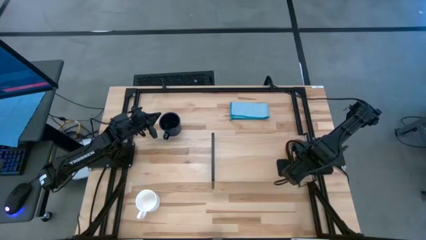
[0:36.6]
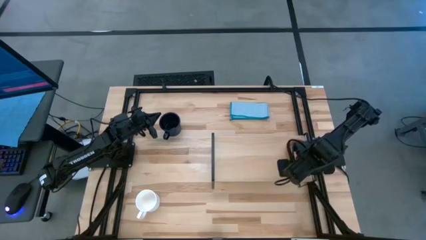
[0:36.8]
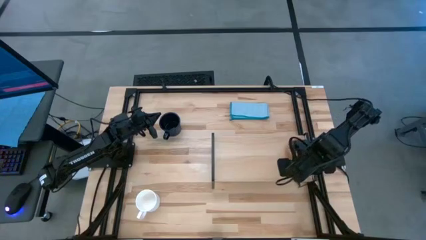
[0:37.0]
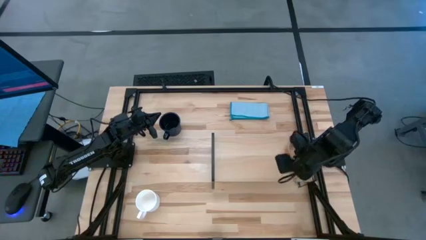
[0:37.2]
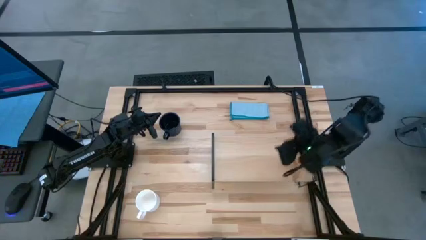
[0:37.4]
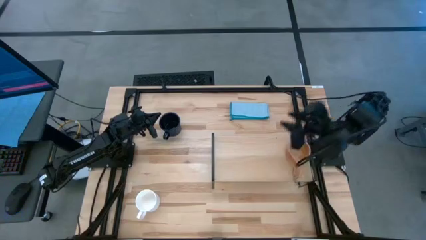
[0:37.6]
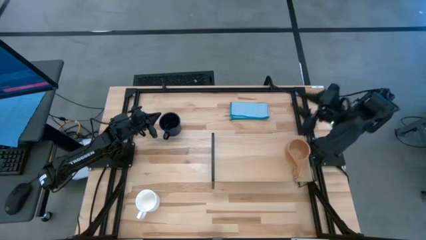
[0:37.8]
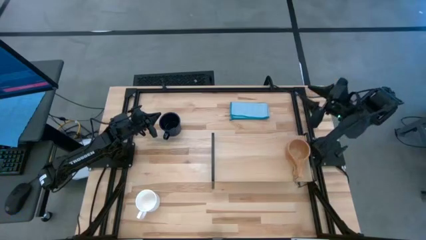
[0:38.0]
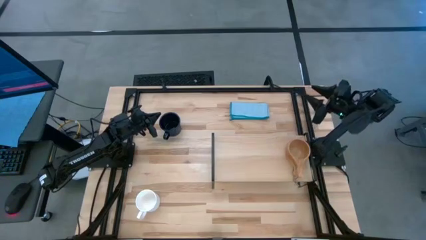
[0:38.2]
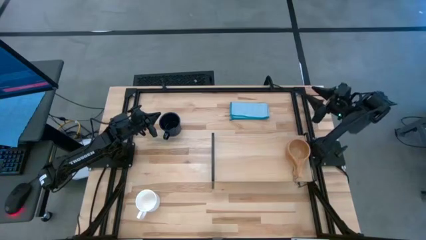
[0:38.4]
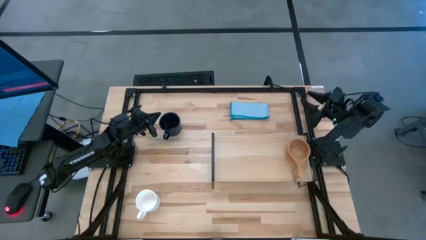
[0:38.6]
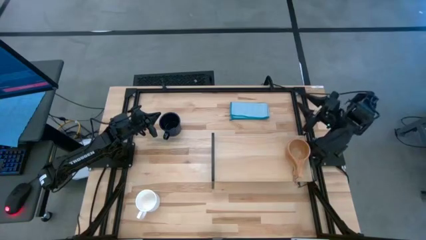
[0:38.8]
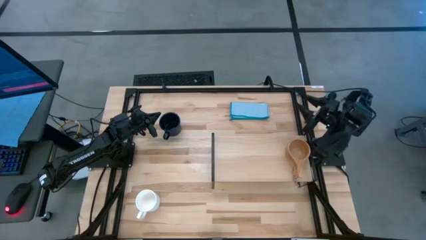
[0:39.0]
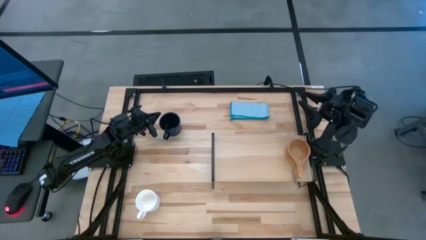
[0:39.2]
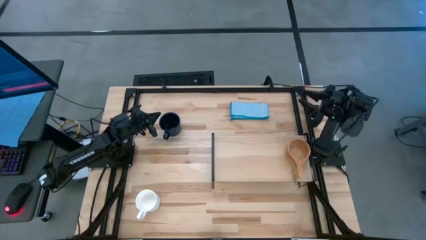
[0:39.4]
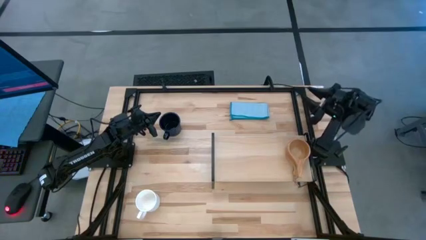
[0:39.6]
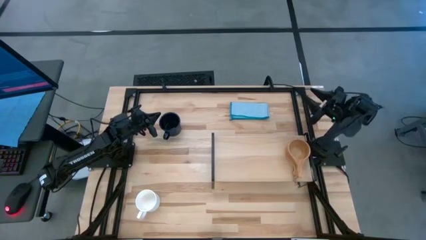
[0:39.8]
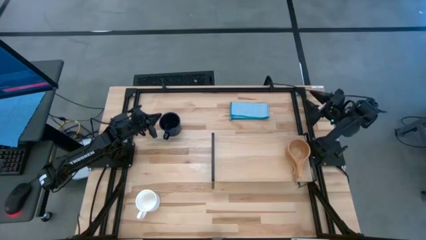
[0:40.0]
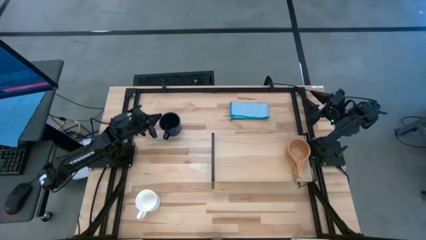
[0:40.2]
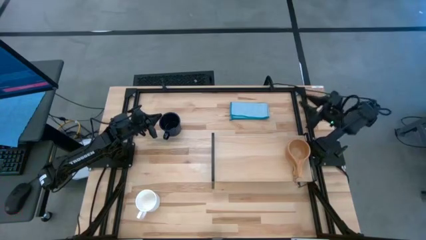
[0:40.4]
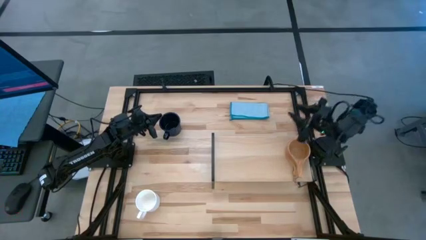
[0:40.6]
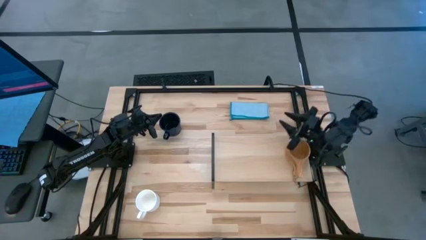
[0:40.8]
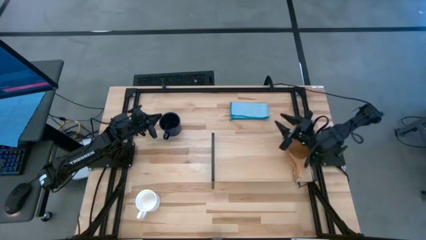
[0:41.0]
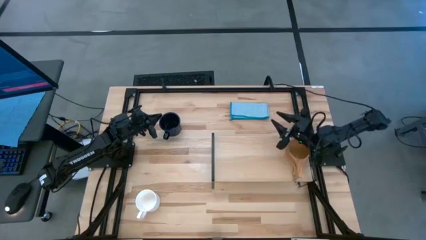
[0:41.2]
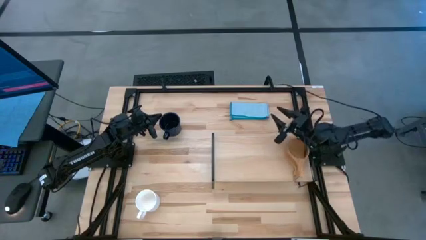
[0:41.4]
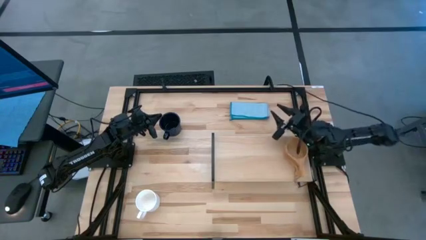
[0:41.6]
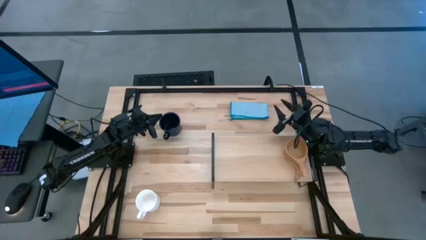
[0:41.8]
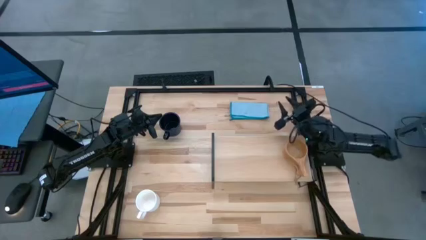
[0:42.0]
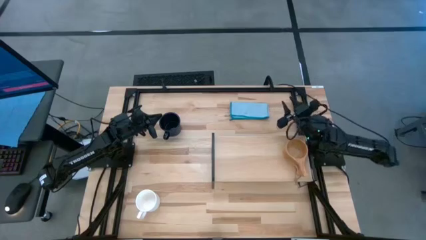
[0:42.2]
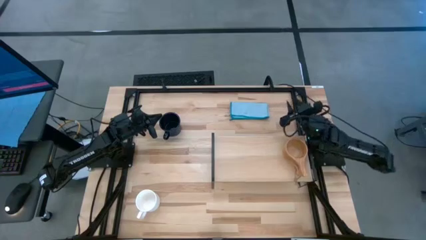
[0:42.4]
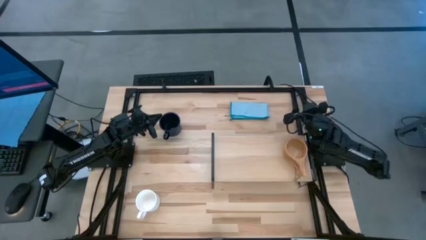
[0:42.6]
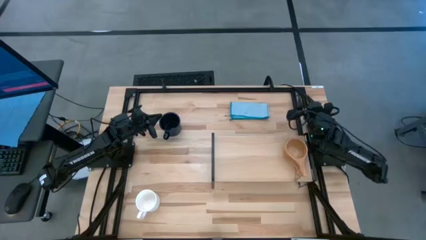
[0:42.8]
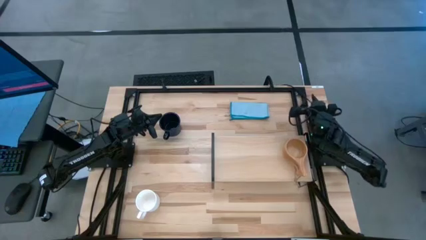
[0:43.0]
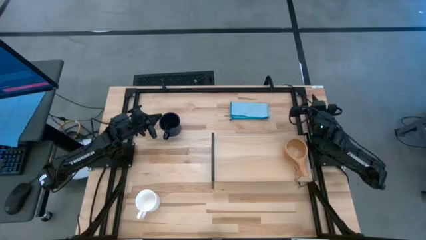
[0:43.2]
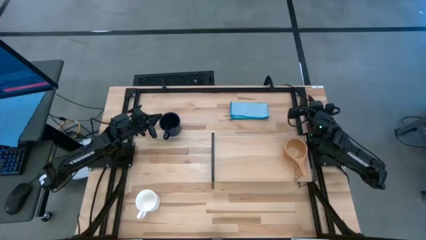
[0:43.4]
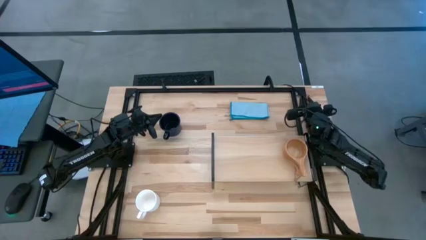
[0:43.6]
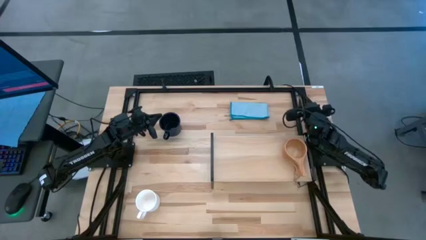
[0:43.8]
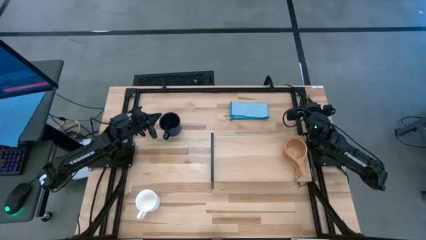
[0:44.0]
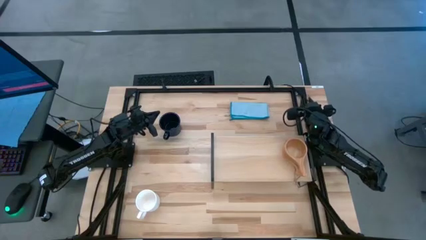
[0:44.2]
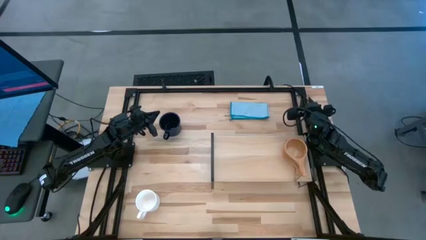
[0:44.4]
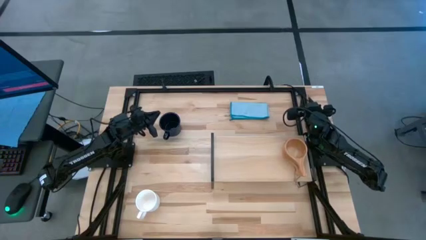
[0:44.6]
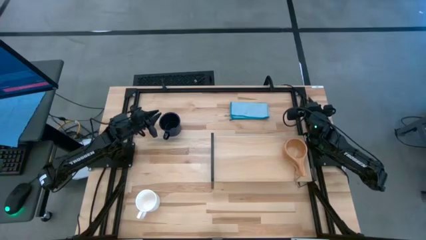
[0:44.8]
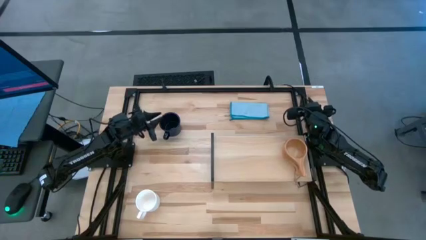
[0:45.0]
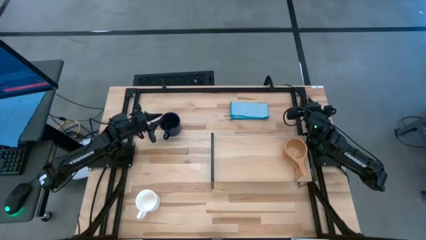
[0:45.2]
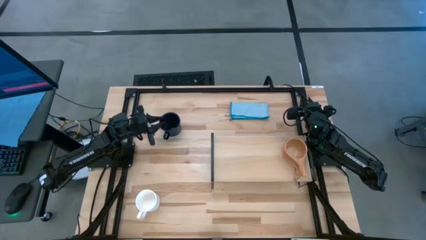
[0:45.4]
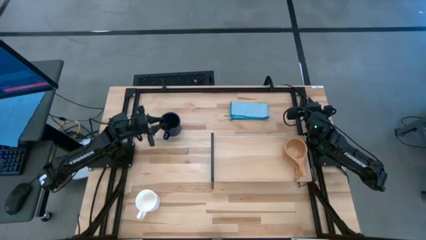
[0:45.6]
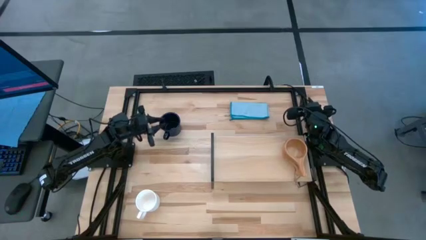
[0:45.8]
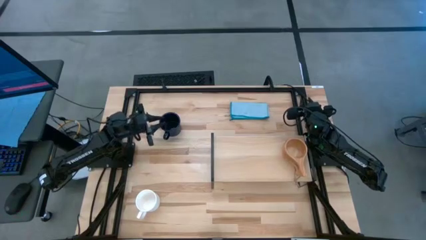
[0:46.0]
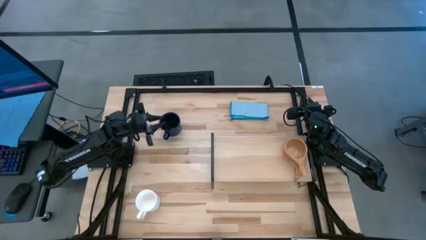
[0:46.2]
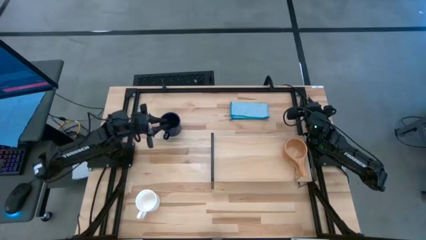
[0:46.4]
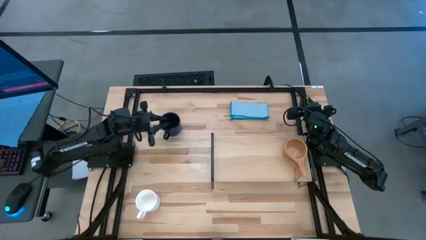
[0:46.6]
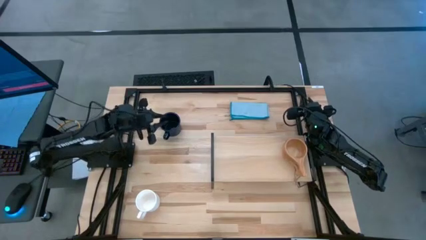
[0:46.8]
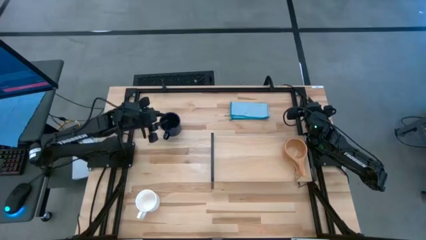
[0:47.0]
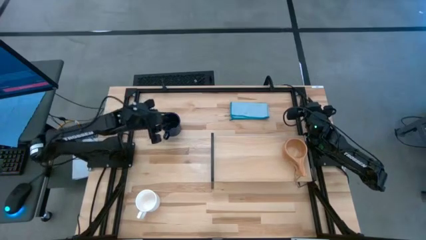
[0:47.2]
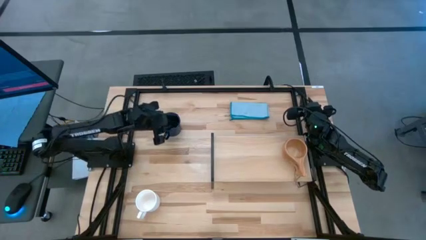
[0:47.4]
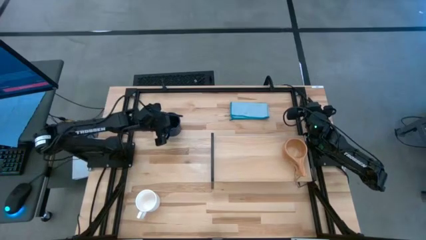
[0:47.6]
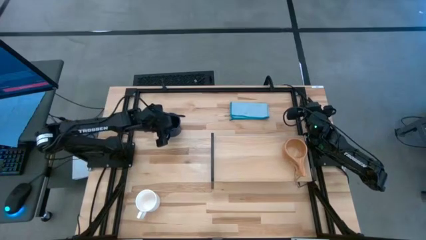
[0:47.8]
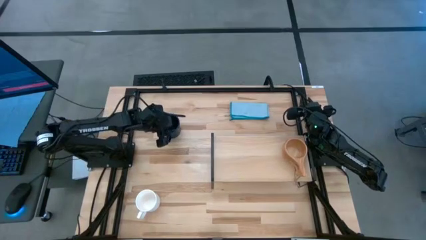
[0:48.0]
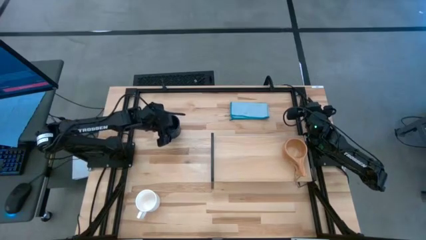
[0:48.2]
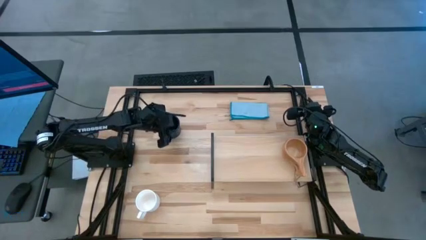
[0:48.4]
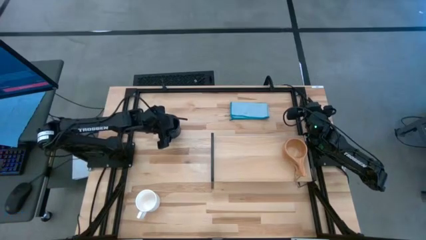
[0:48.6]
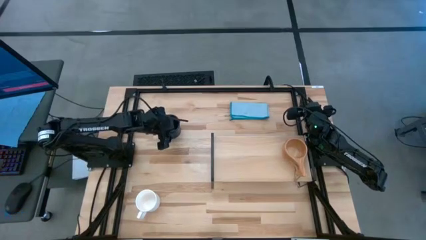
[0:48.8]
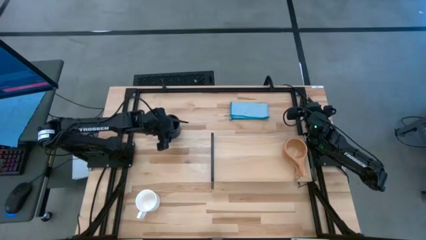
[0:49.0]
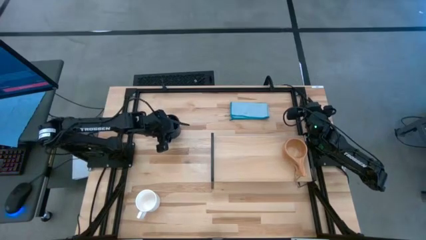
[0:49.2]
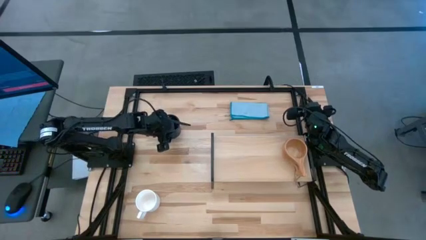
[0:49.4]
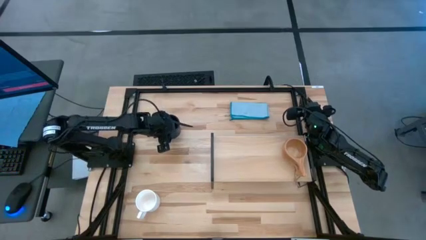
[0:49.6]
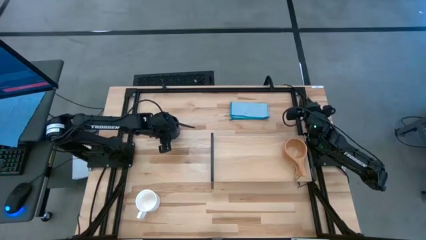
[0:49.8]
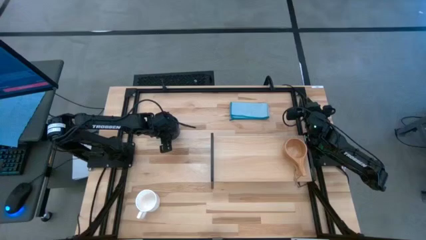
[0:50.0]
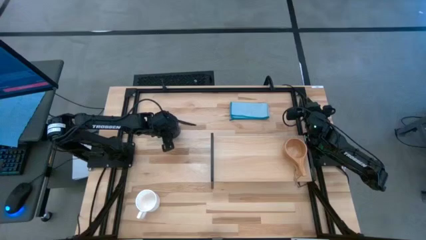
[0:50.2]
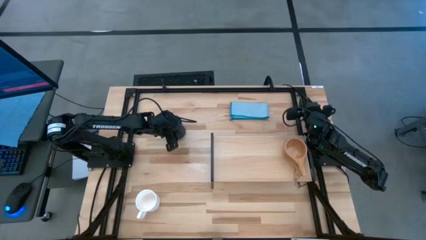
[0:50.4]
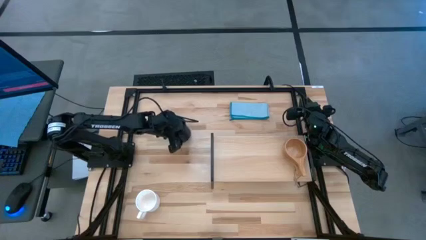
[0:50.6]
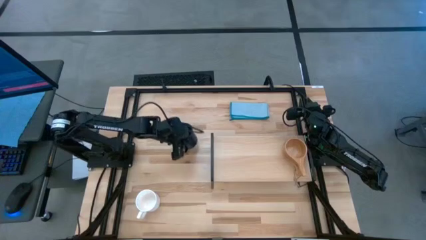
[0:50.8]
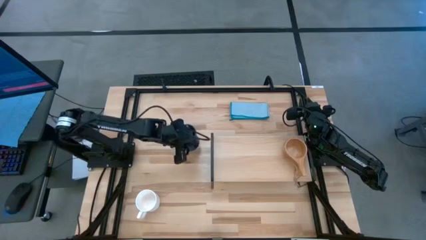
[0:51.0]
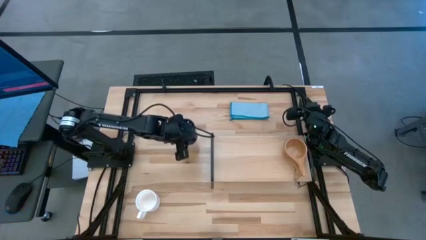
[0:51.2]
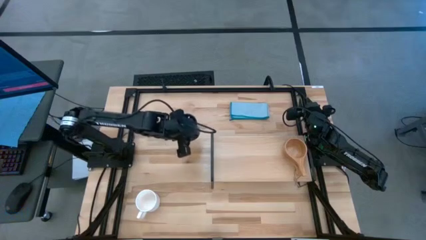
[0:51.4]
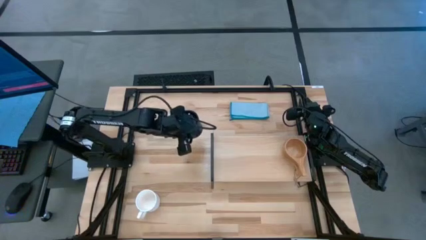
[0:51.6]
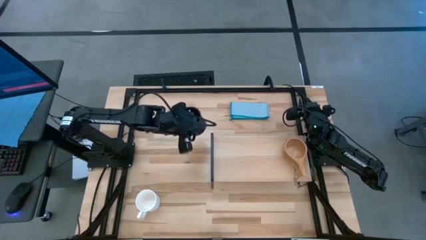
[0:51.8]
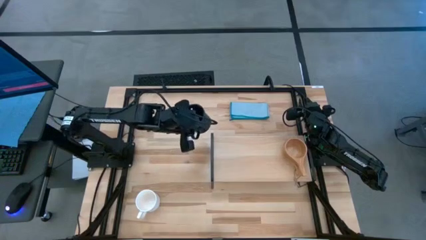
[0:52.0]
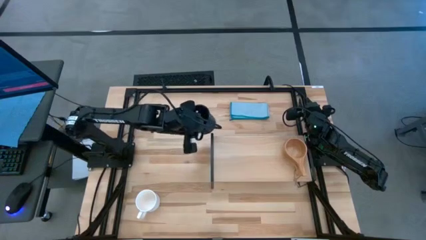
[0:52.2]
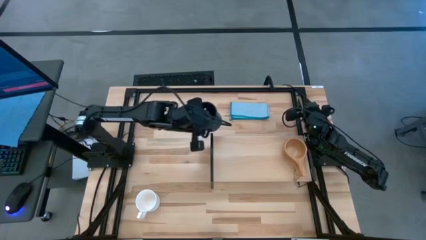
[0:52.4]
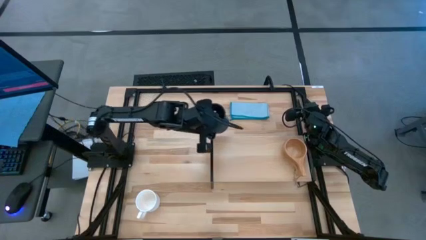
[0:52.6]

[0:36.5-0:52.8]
Task: Stack small to large cups/mugs on shelf
Put the black mug on the shelf
